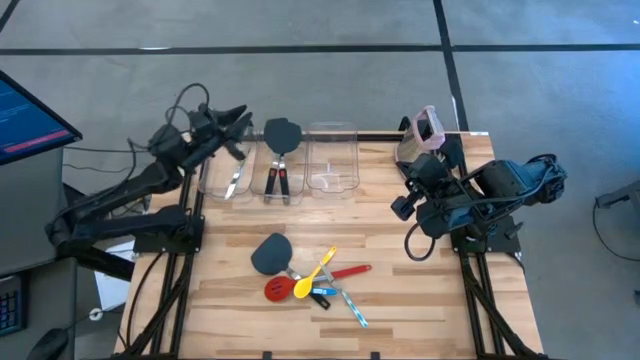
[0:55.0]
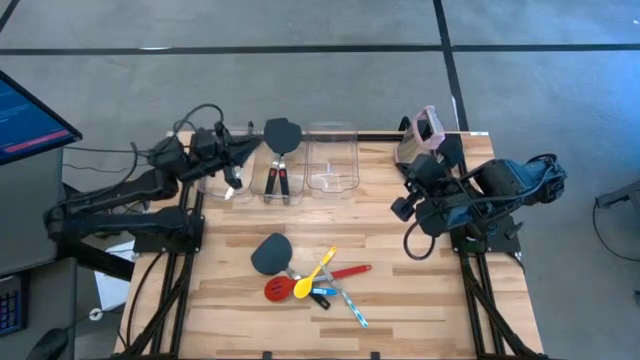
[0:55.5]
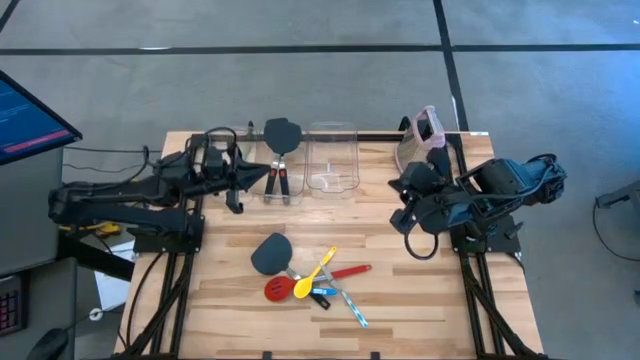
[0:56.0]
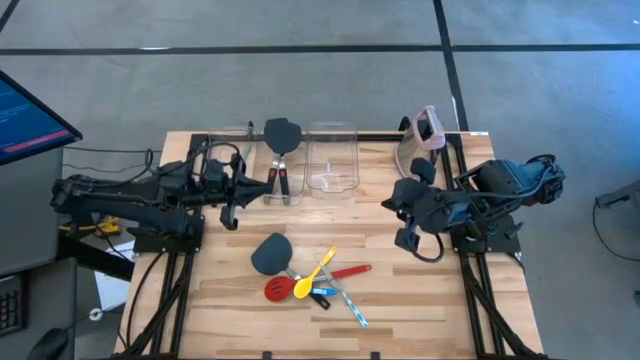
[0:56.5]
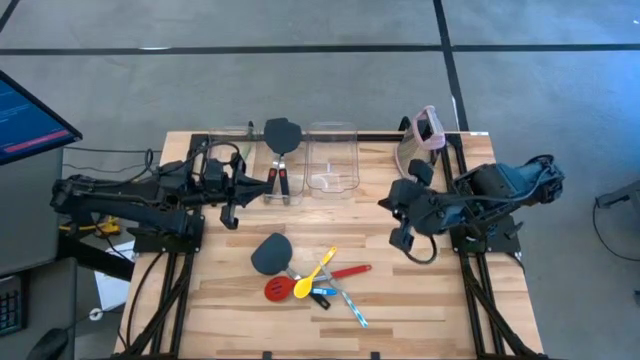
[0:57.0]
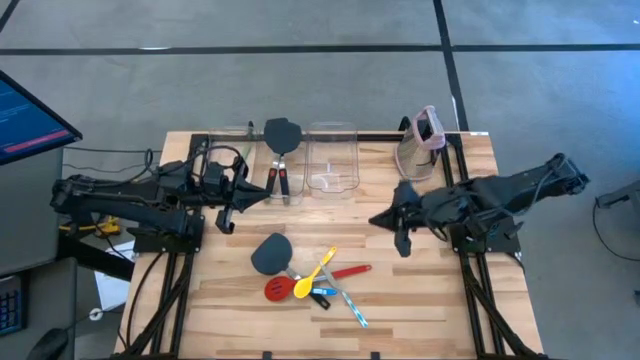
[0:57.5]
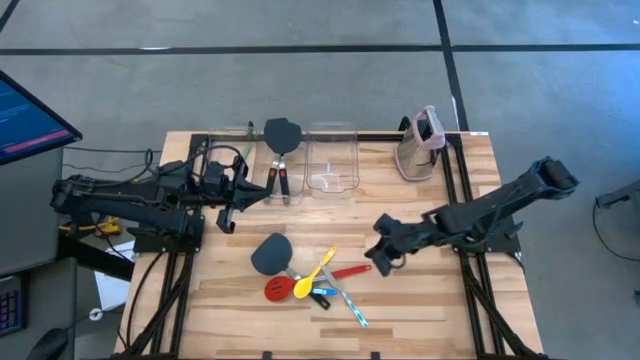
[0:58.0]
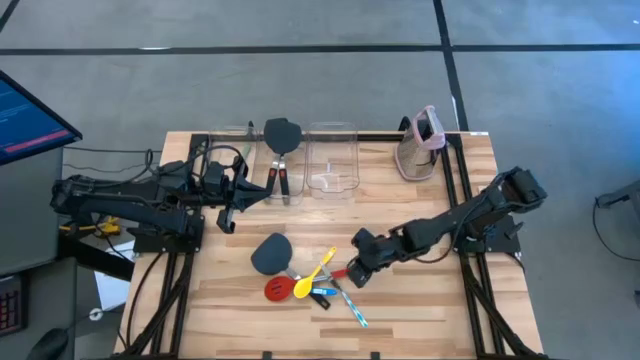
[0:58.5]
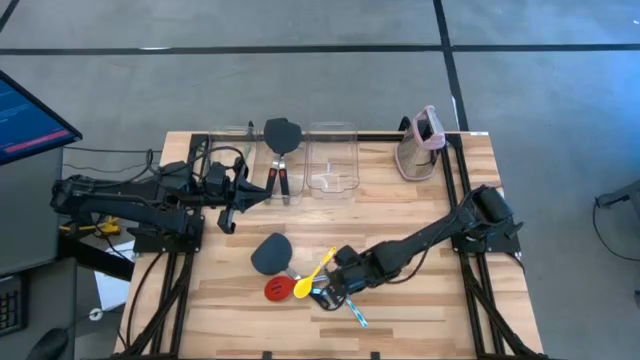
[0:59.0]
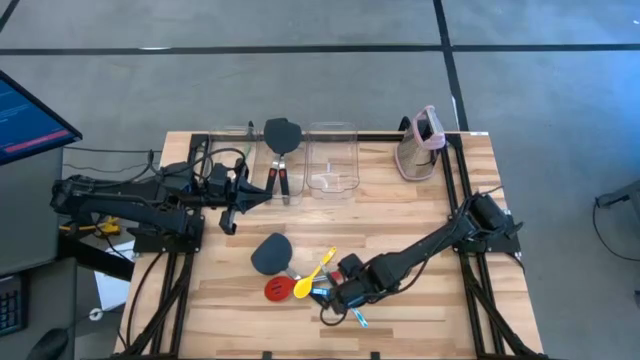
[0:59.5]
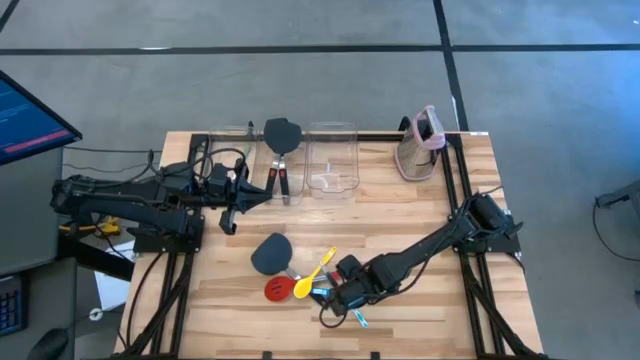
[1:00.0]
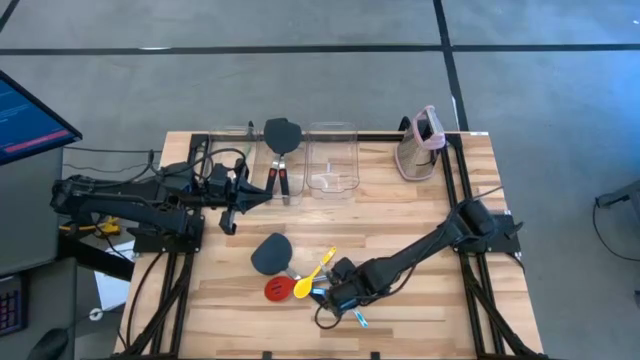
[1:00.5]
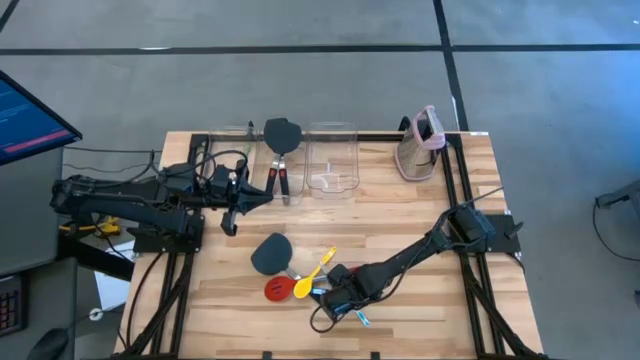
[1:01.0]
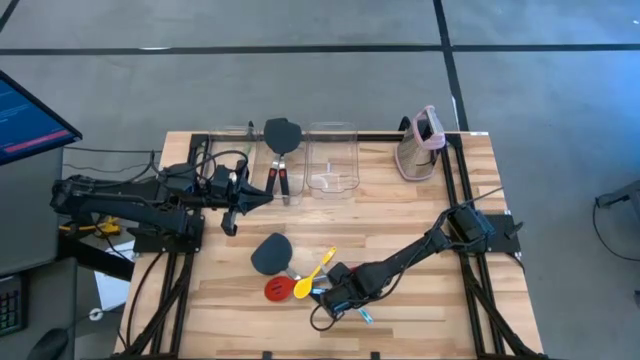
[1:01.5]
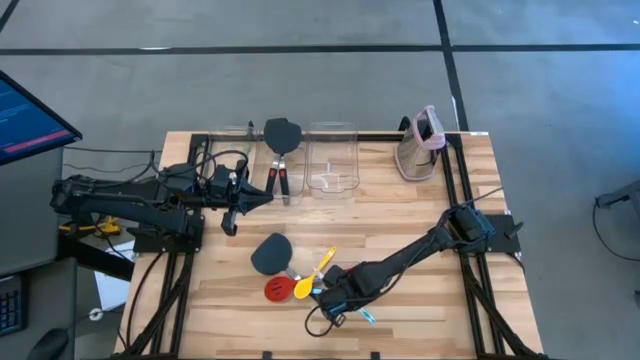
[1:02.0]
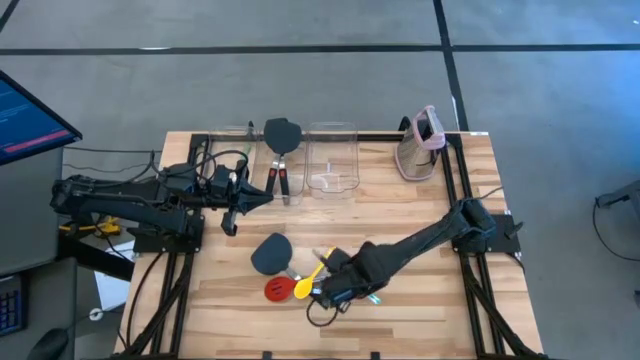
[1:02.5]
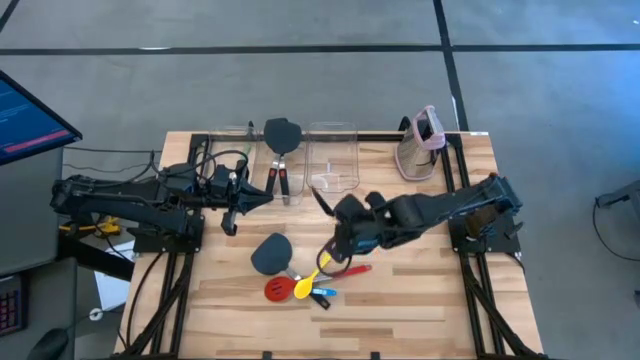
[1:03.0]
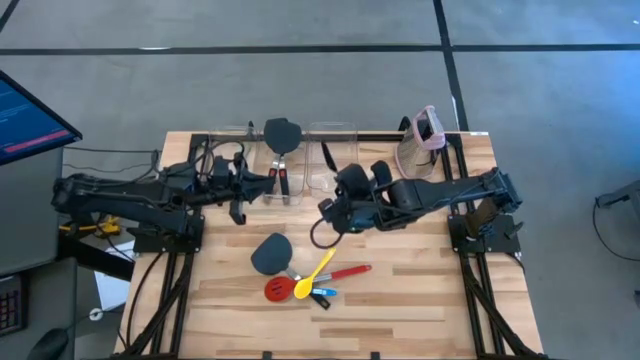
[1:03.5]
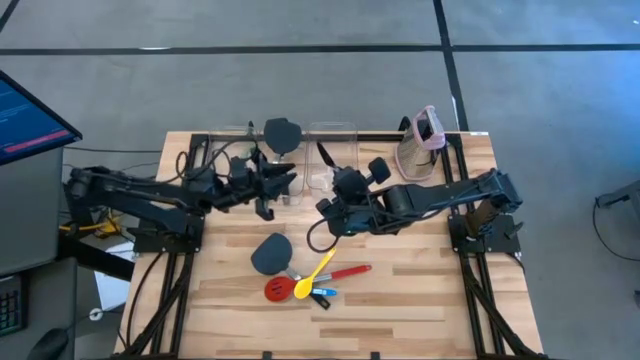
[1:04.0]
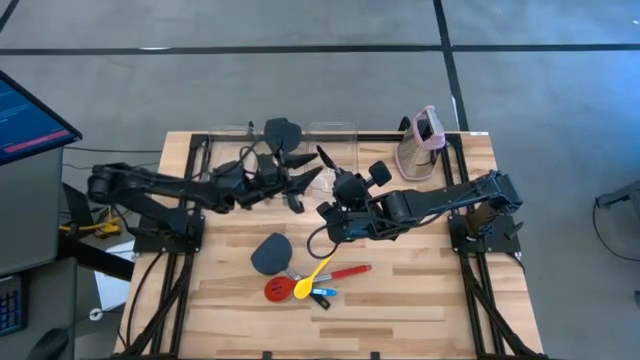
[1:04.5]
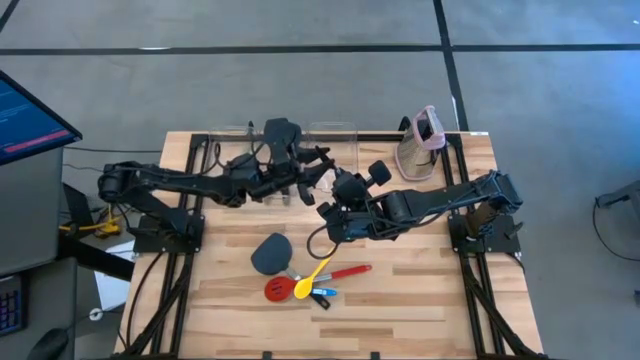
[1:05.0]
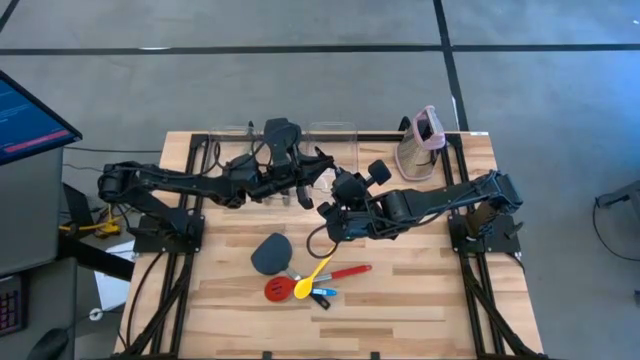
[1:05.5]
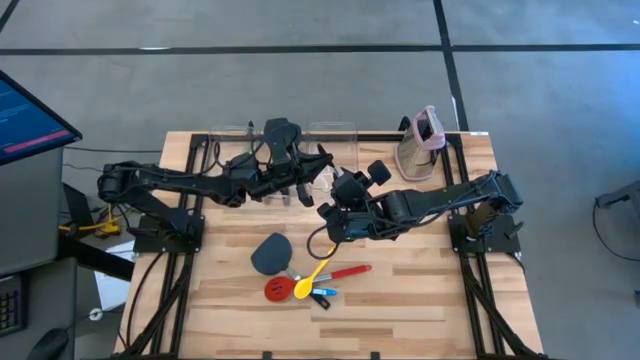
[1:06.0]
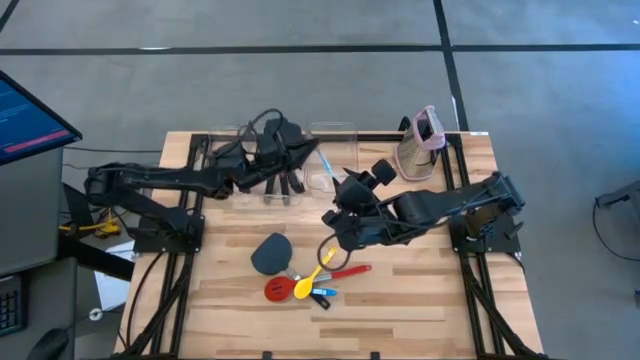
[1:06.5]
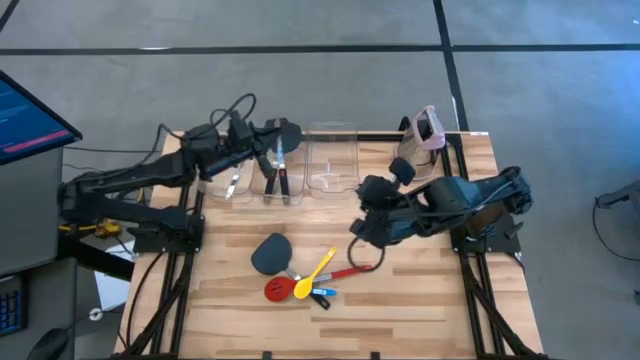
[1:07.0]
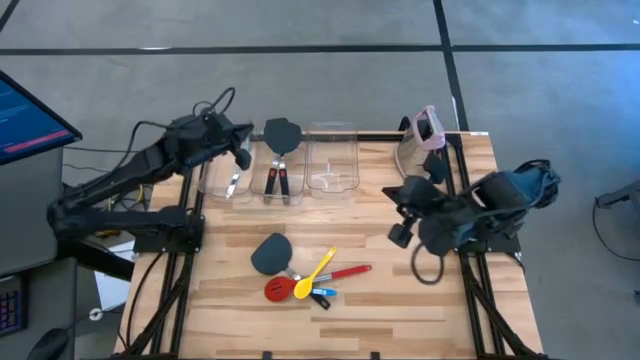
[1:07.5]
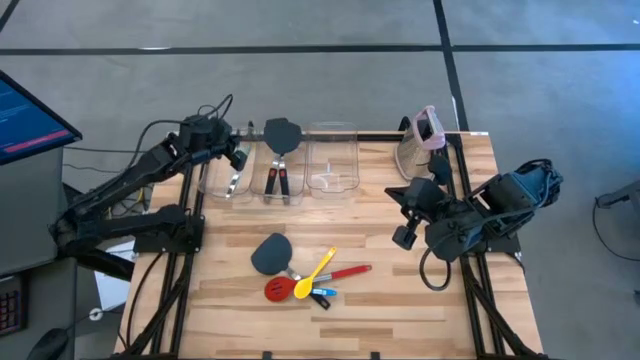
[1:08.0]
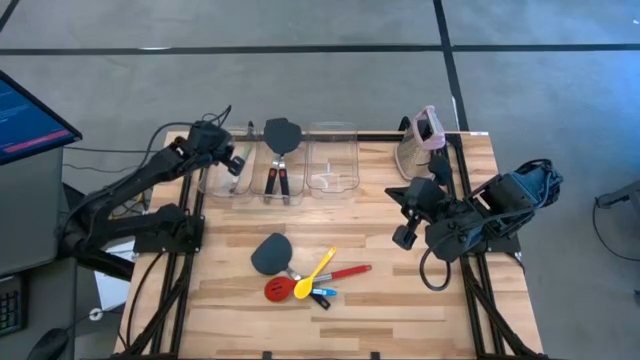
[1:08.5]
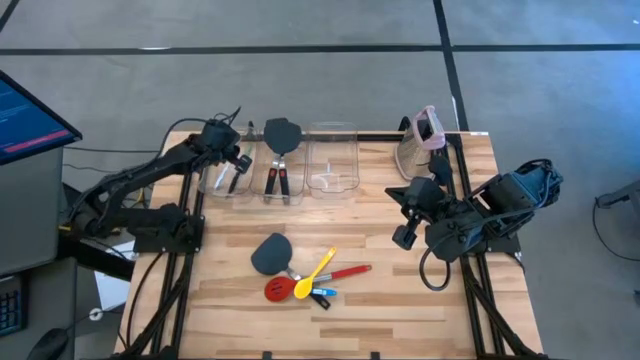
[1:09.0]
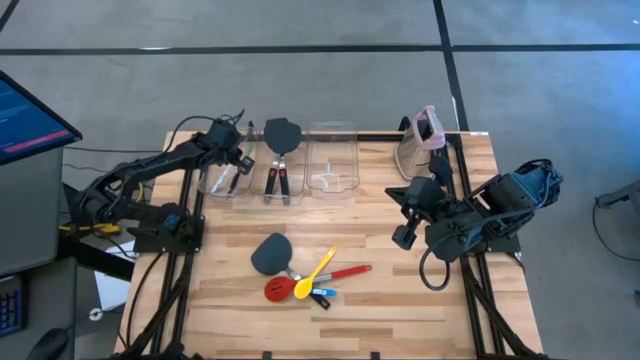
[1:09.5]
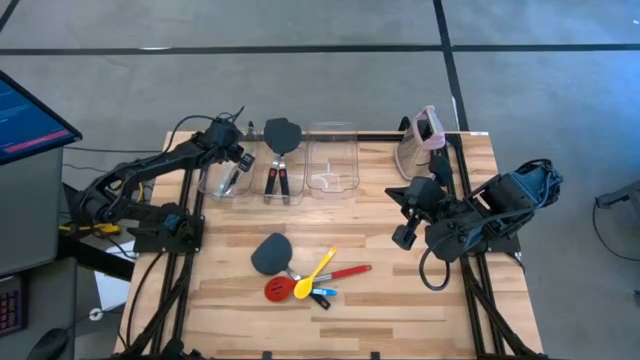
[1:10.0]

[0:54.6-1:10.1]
Task: Pick & Place Kitchen Items
Put the blue patterned knife into the left transparent bin

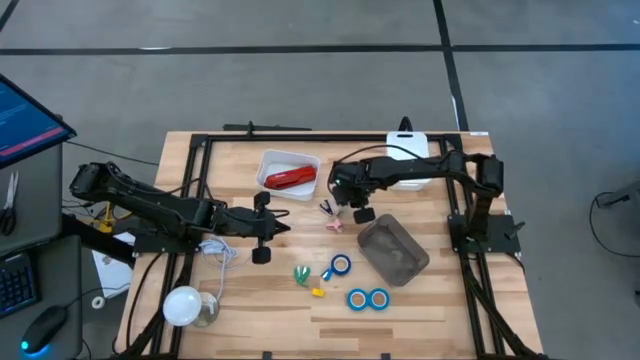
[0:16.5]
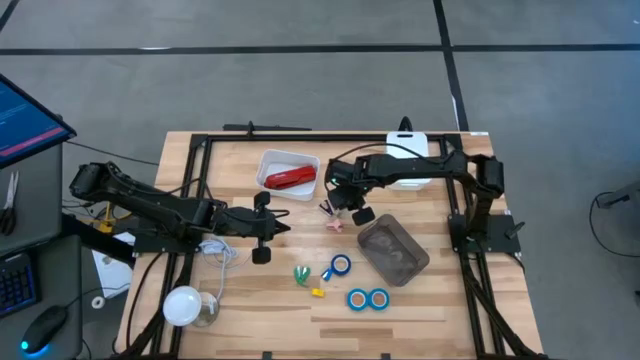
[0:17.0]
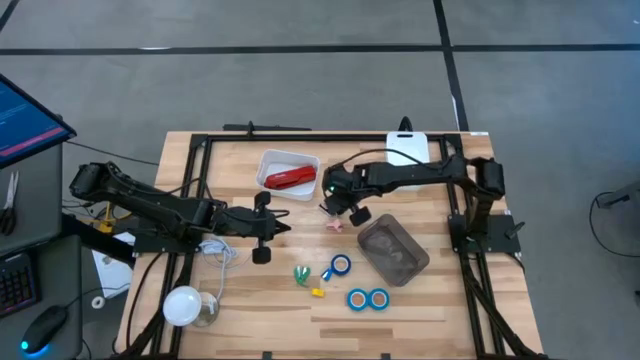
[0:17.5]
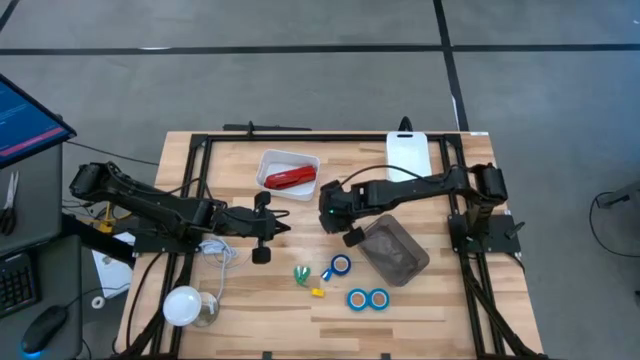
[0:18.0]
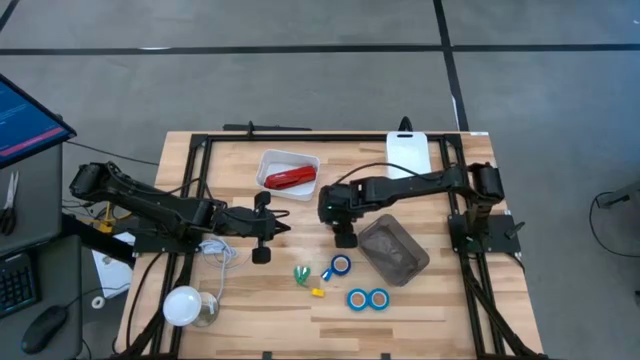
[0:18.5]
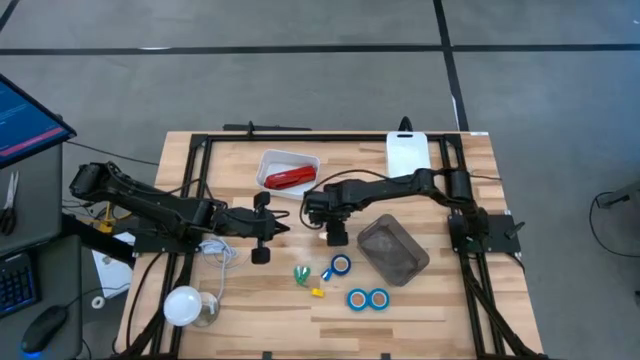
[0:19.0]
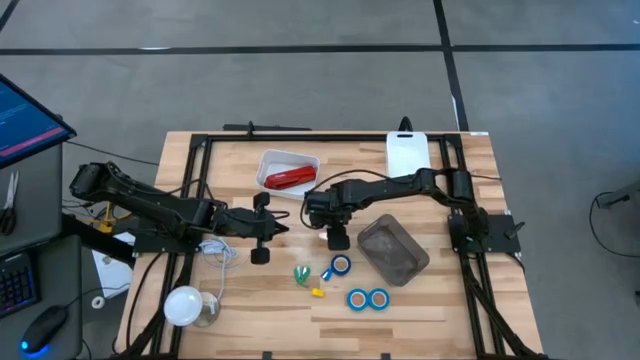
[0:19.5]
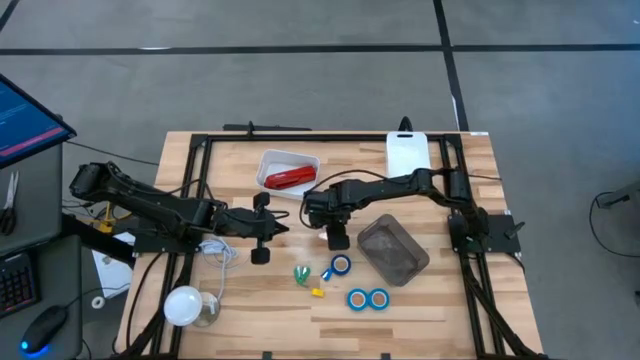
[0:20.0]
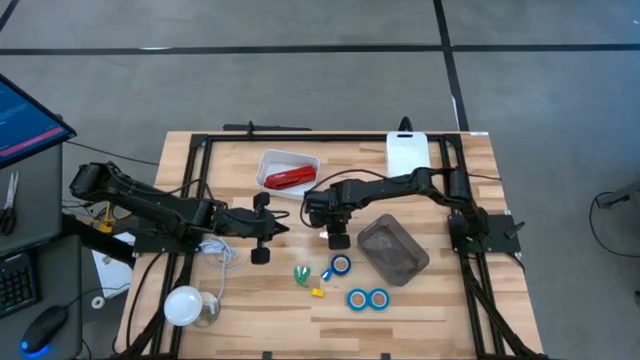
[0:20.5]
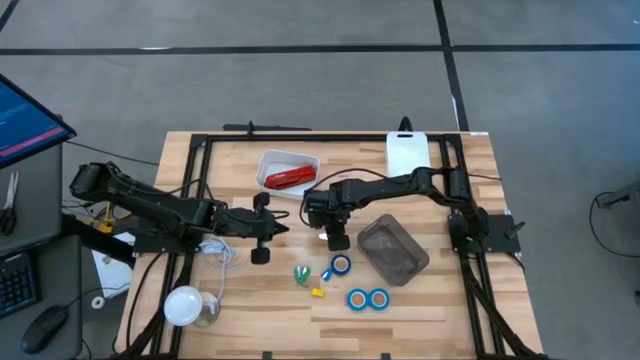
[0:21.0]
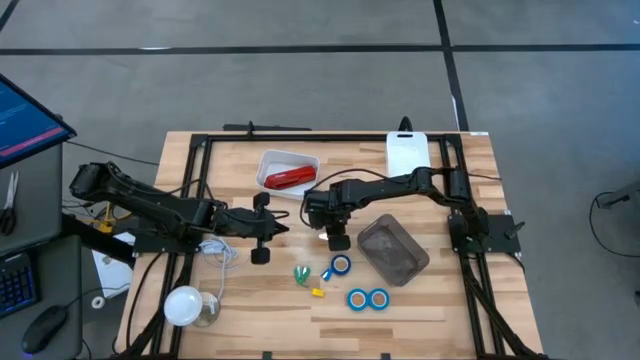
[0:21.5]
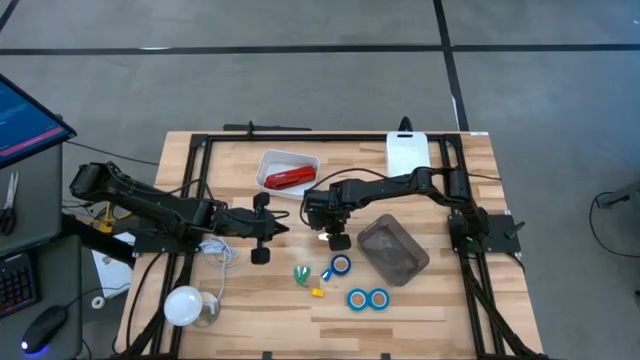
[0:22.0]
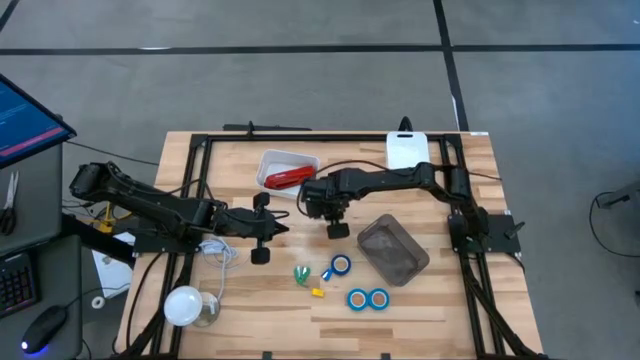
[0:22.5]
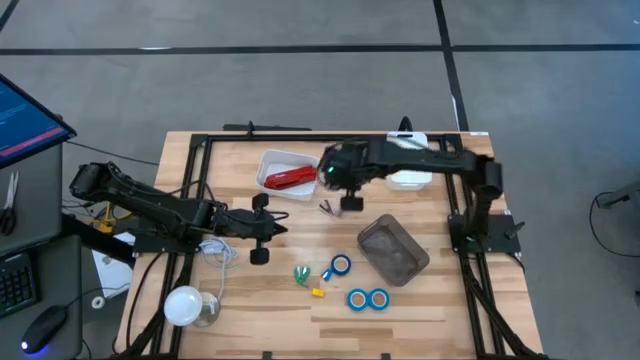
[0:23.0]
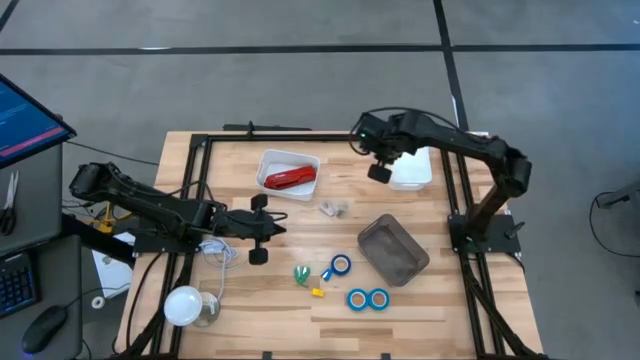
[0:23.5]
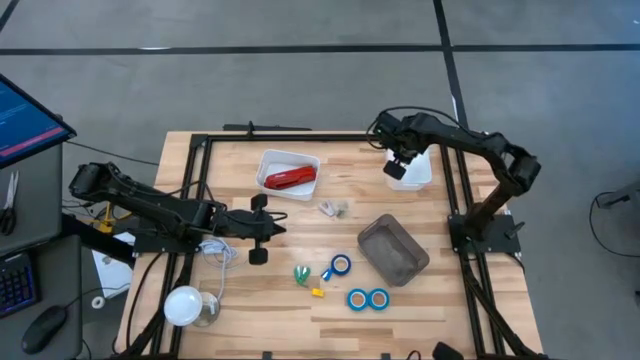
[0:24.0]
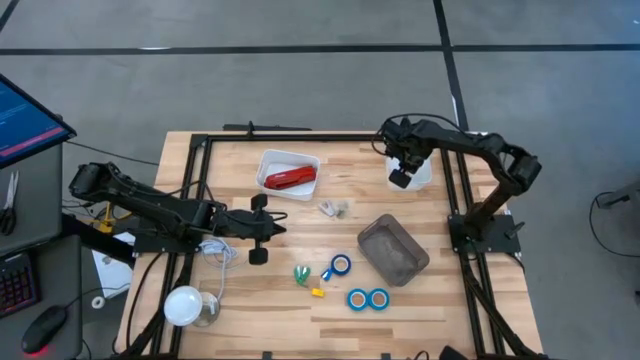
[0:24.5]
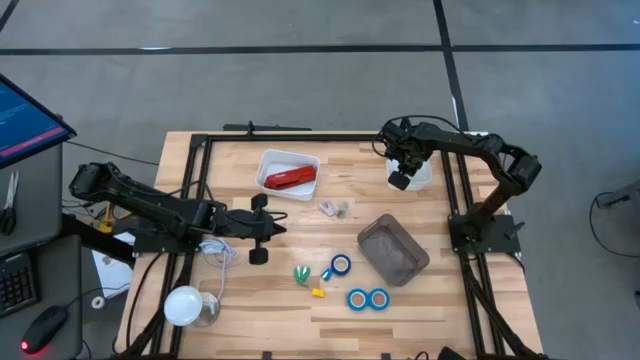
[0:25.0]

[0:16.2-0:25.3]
Task: Pick and place Stapler, Stapler remover, tape
Put the pink staple remover into the right white bin
